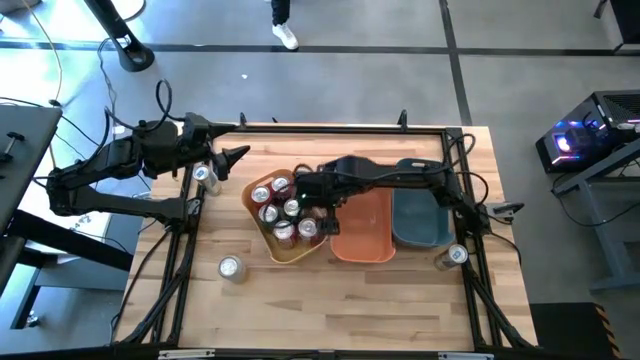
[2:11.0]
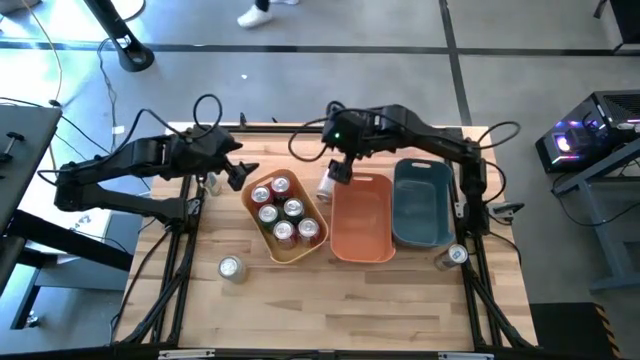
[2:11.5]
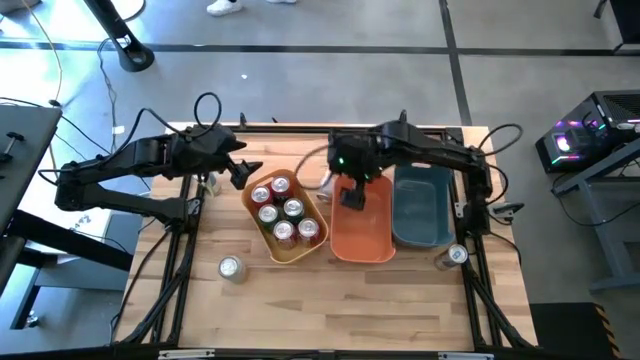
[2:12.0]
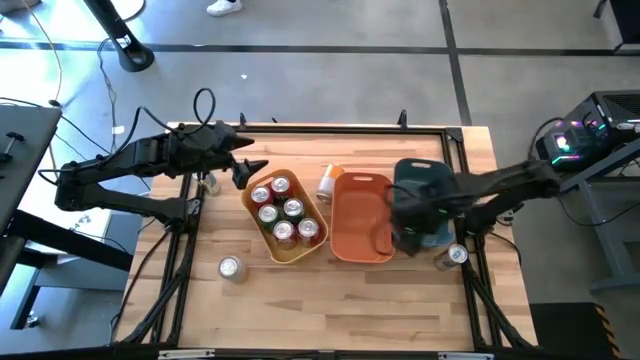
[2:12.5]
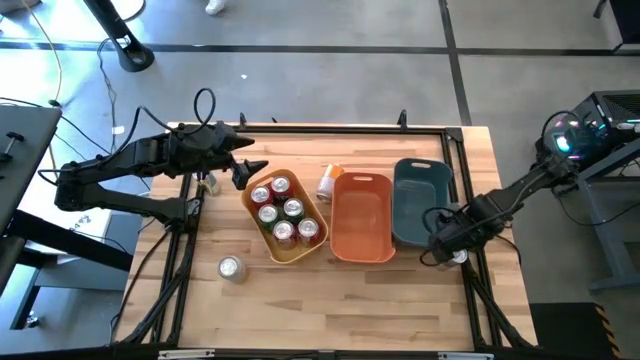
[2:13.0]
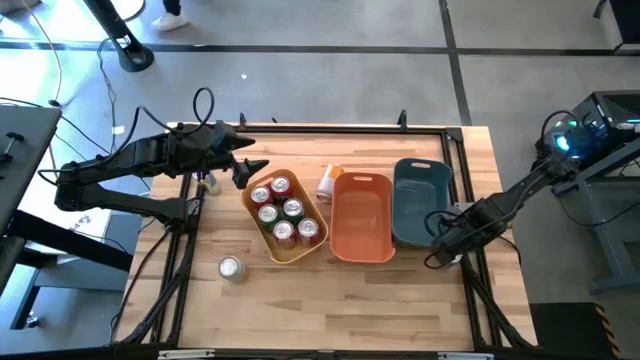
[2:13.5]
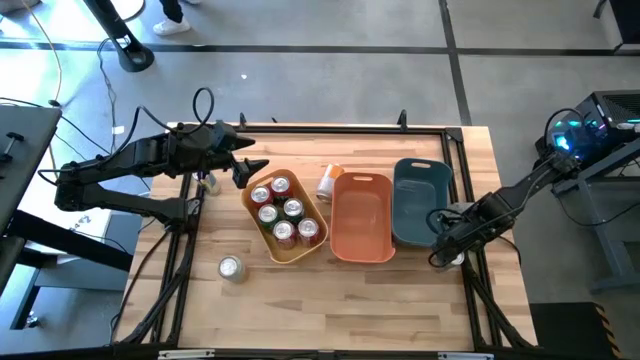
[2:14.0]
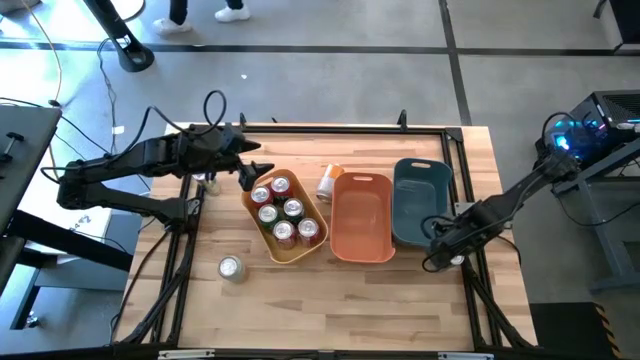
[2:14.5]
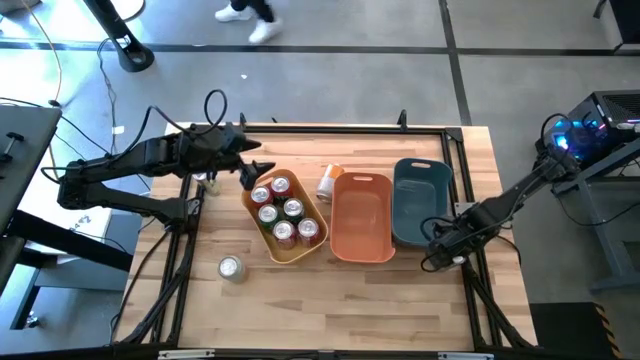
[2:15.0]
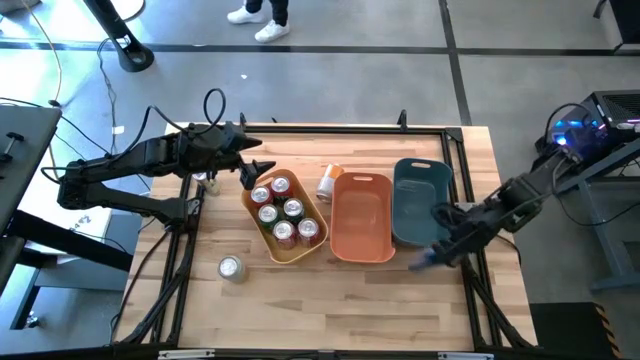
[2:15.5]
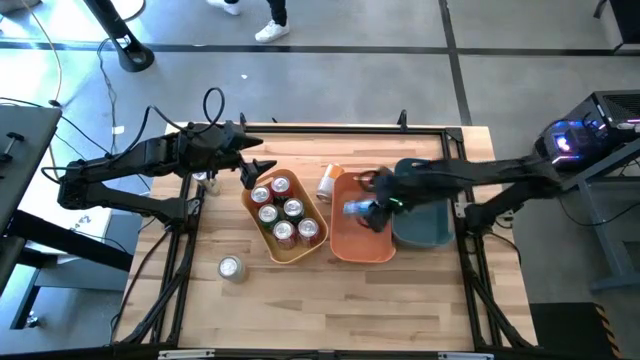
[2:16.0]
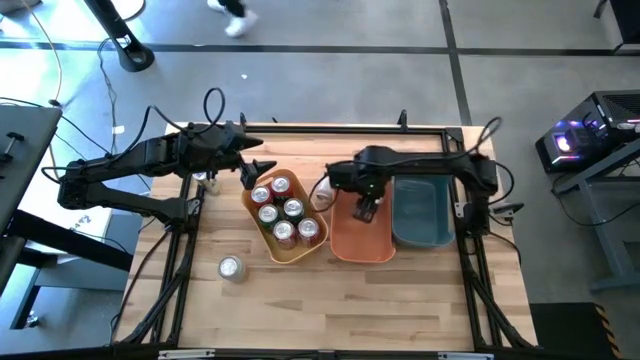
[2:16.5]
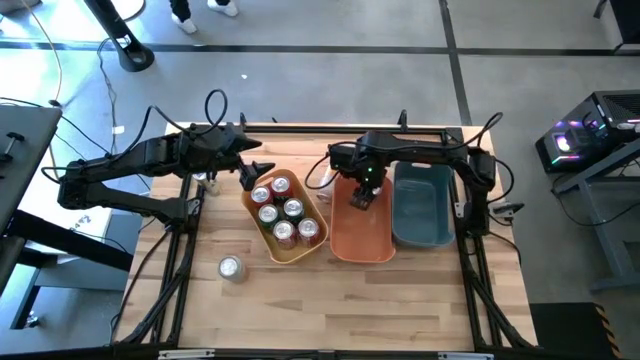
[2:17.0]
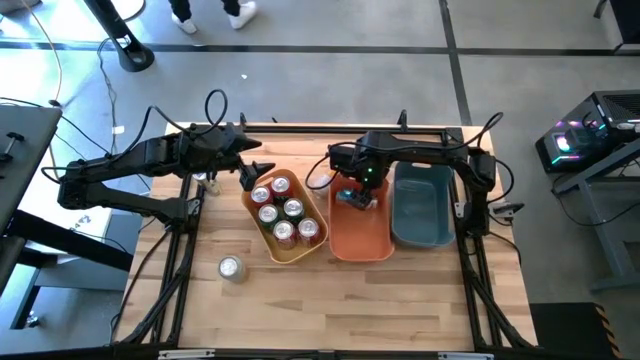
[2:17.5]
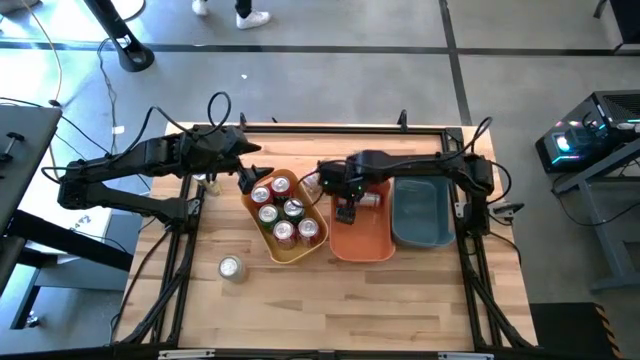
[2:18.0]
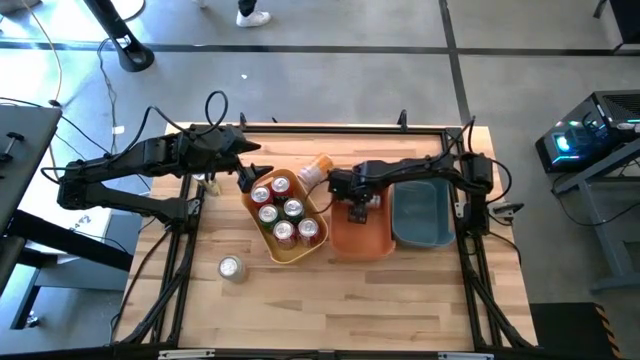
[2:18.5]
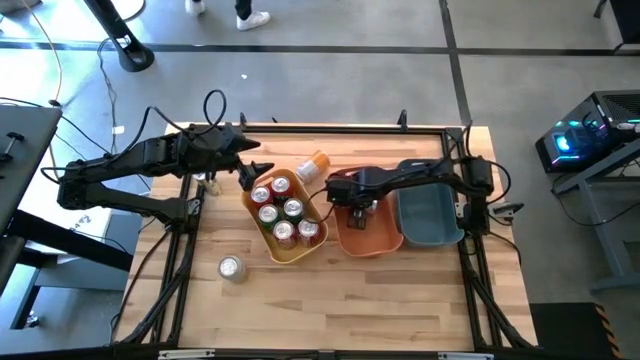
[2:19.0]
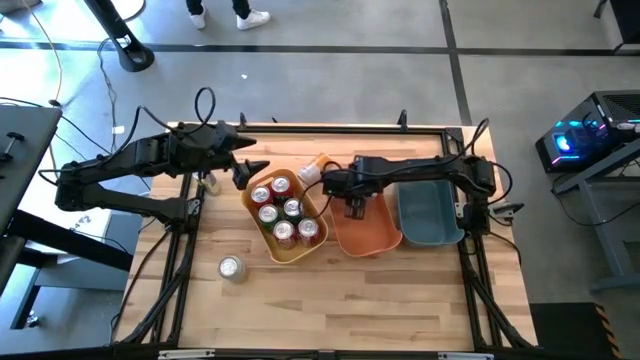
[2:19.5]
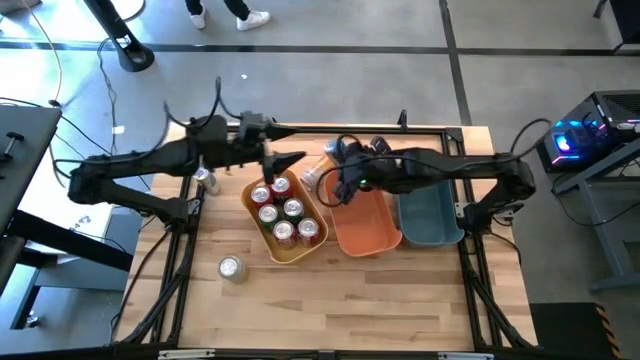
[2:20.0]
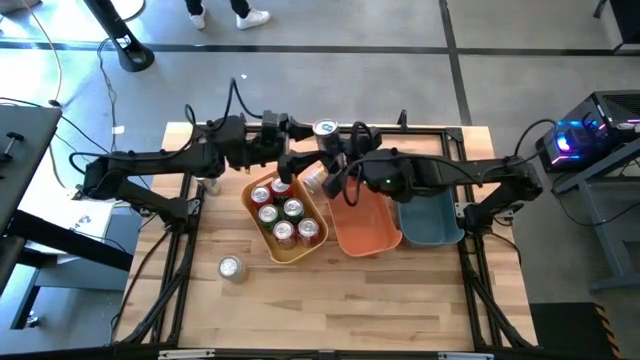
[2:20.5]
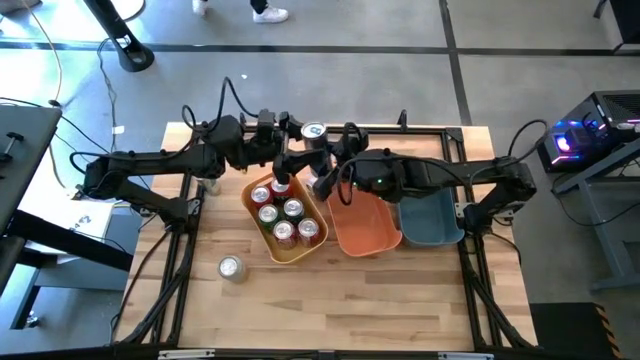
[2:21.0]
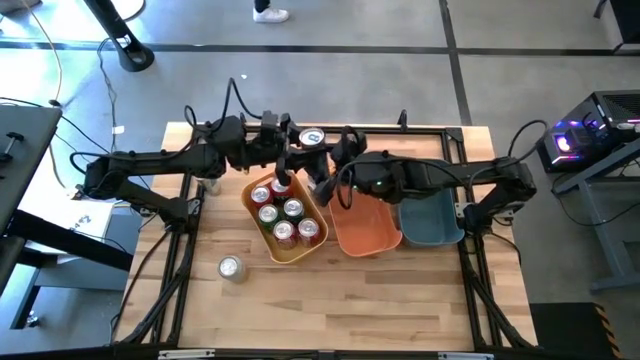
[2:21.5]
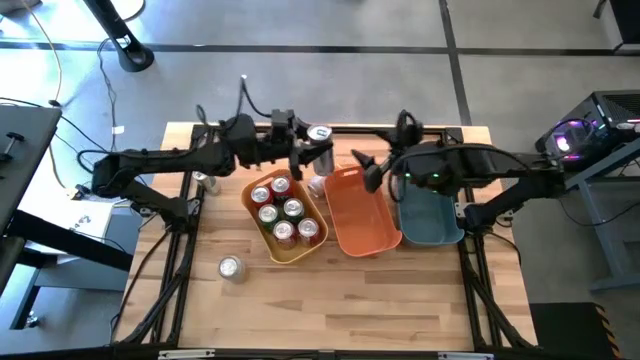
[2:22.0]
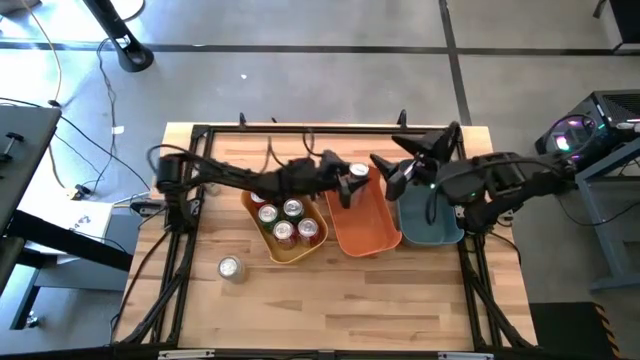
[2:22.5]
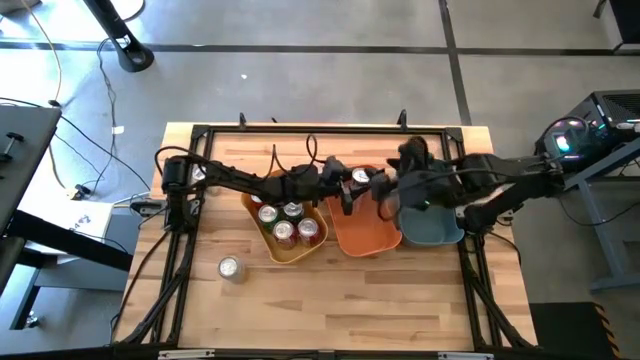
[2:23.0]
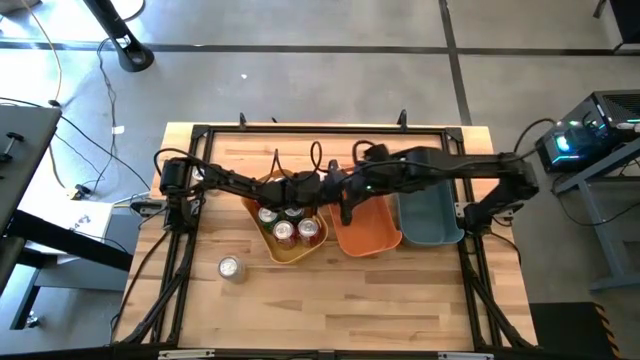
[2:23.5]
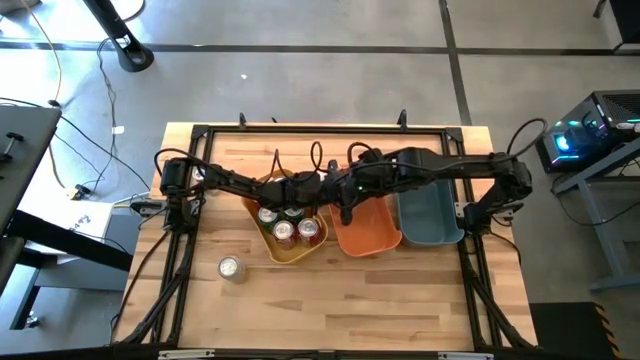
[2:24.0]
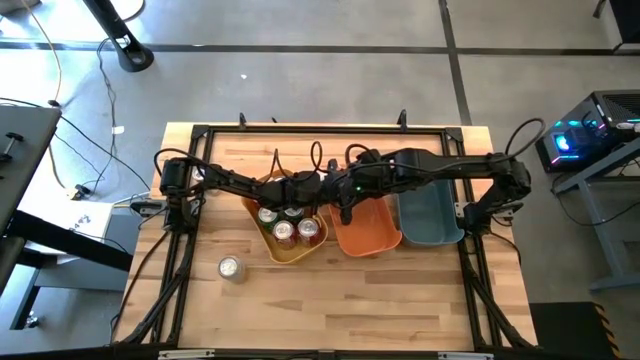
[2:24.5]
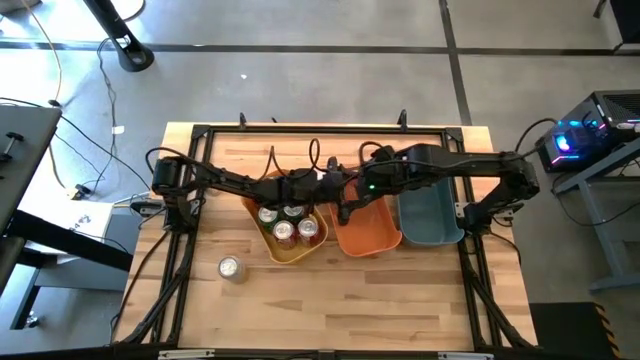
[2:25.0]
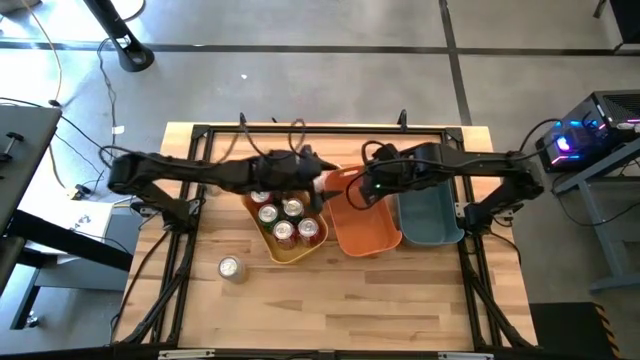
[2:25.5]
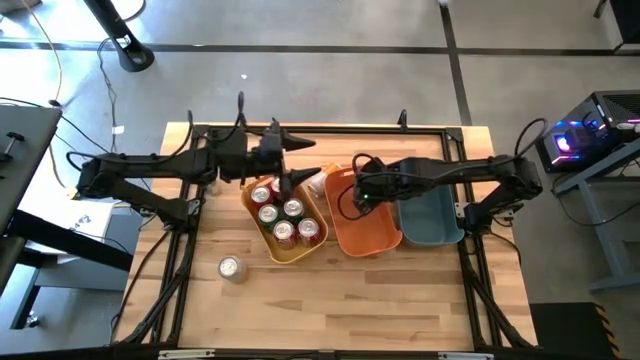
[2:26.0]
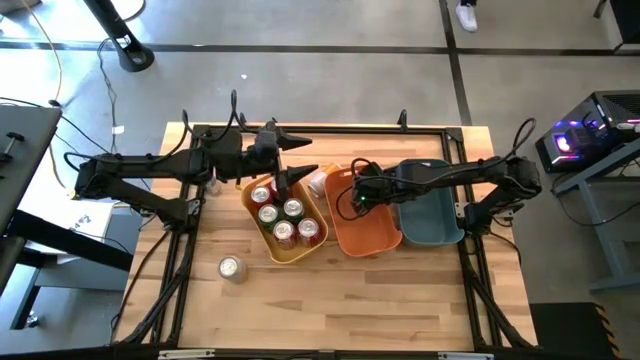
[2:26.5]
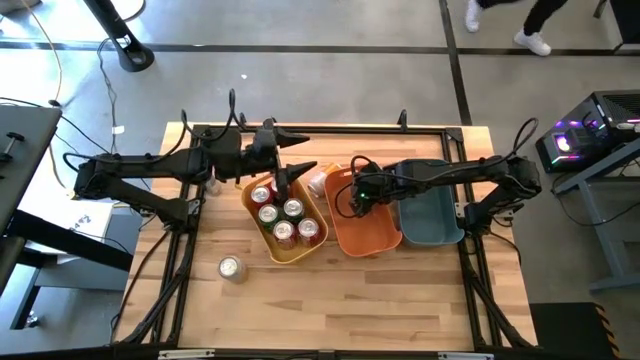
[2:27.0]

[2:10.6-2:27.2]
Task: Sort soda cans
Put the right blue soda can into the orange bin

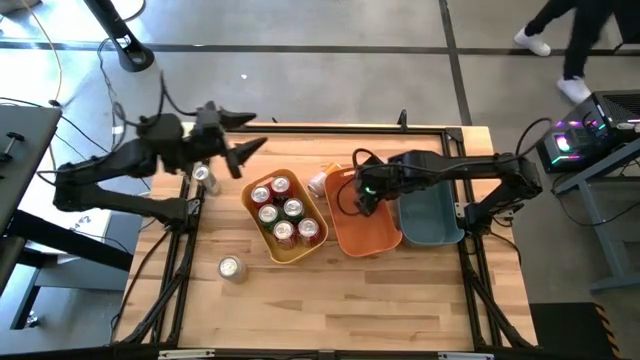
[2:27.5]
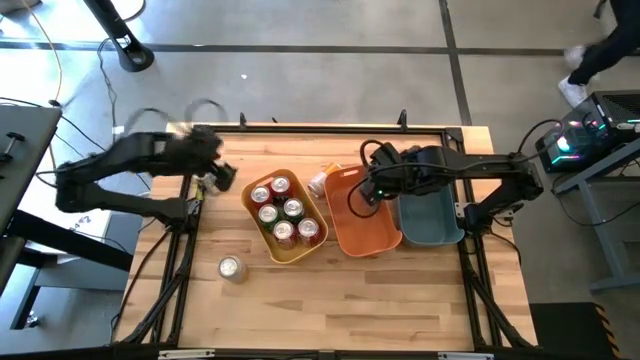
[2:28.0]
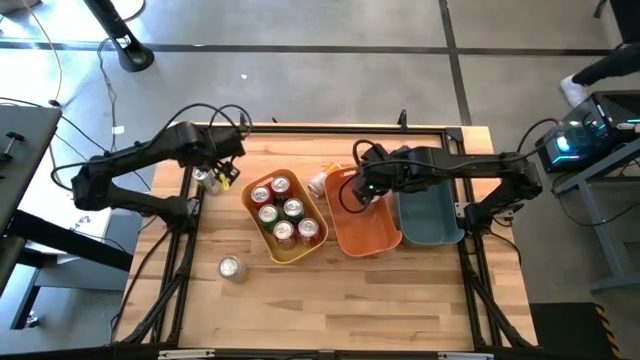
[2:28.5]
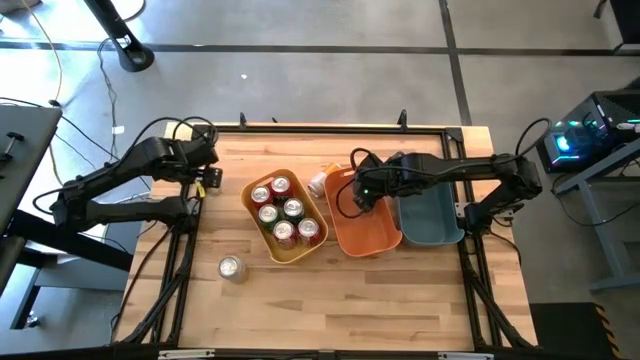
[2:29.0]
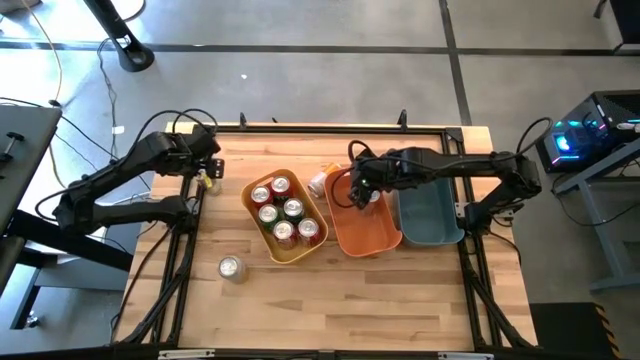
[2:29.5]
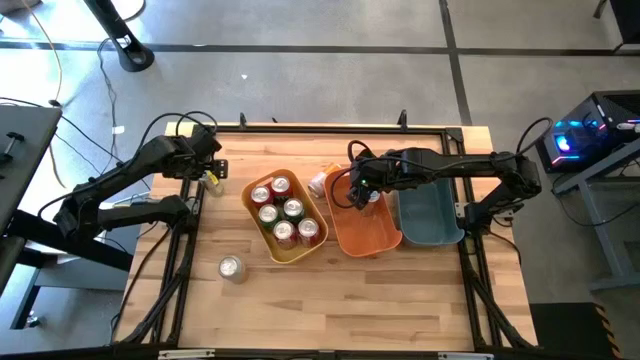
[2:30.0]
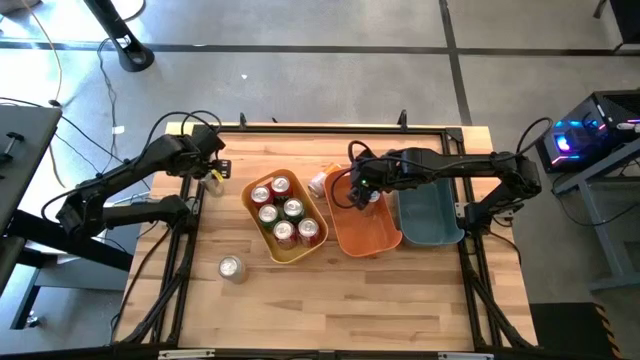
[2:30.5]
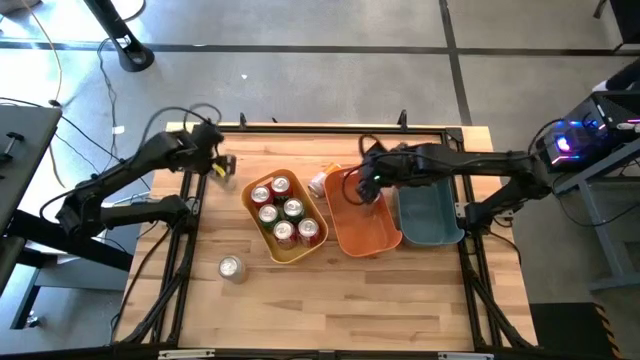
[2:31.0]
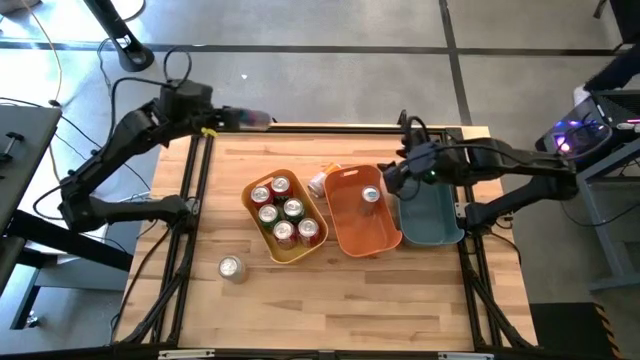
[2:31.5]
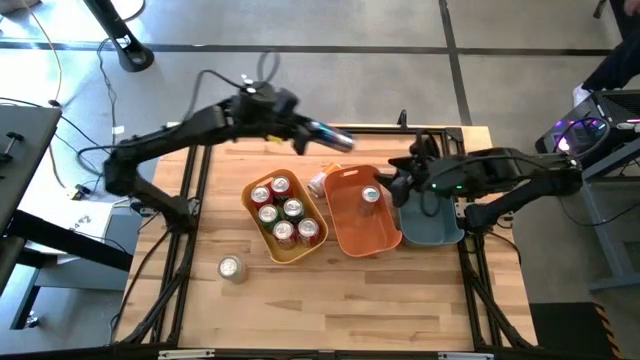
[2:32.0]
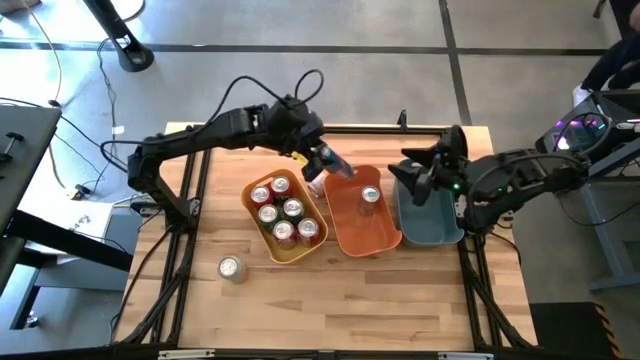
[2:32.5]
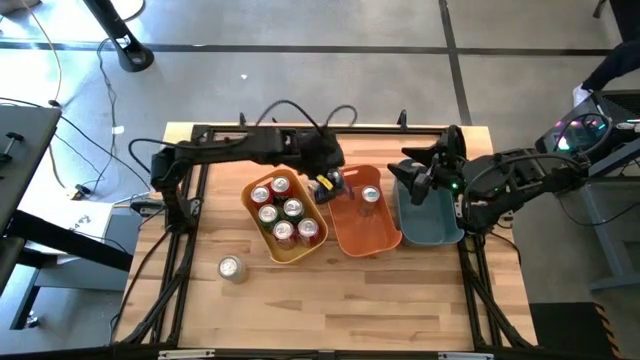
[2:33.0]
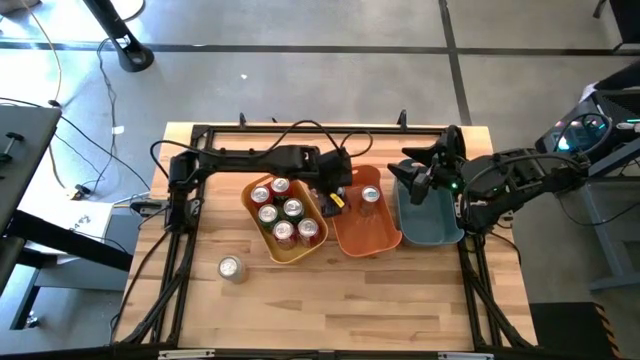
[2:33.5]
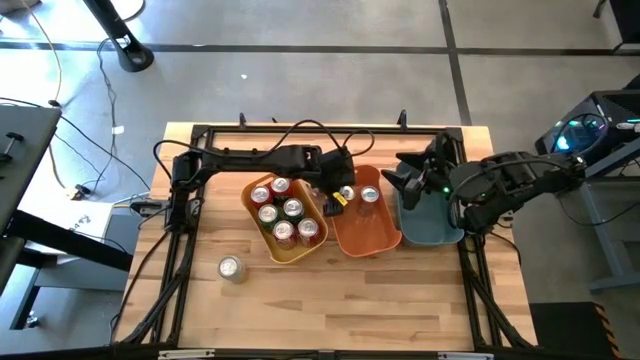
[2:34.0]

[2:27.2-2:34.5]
Put the blue soda can into the orange bin
